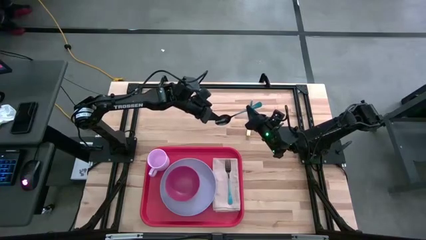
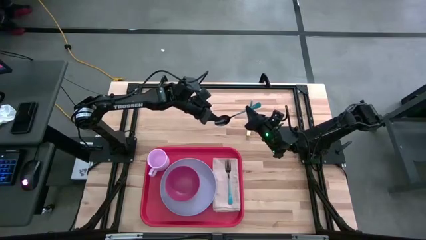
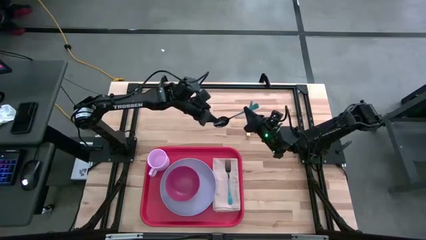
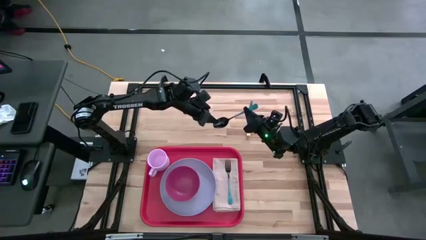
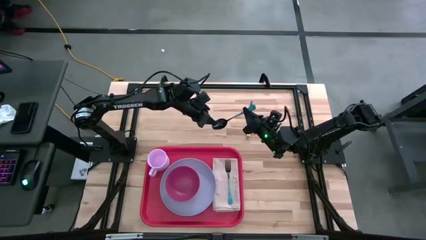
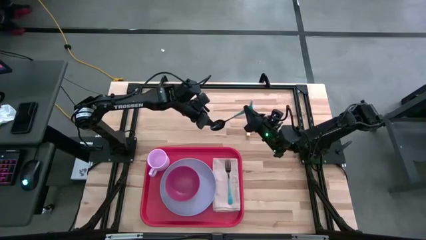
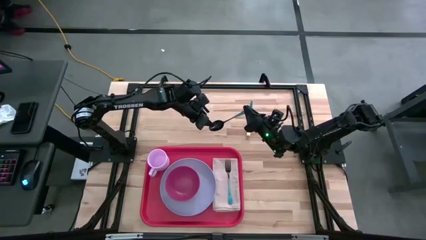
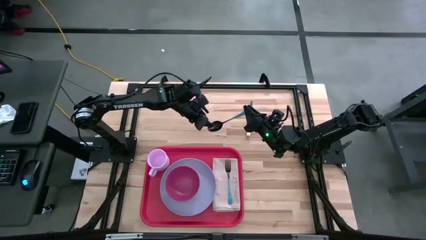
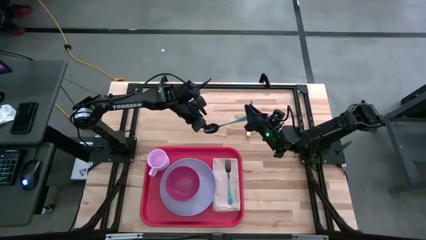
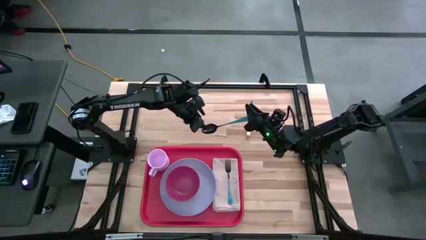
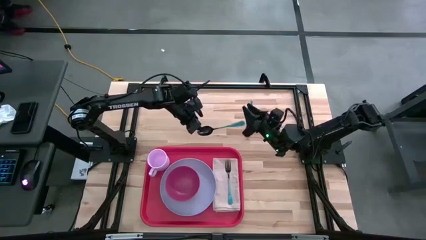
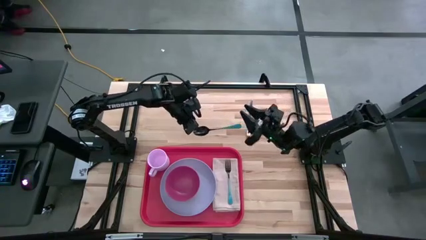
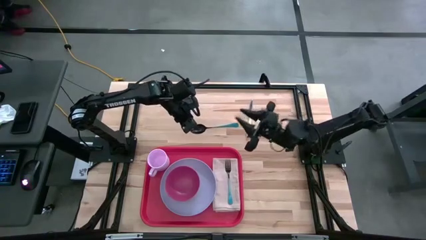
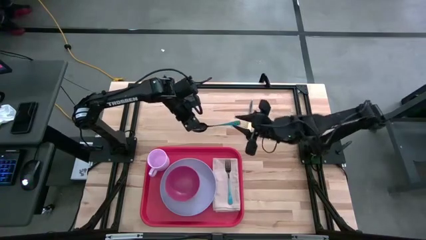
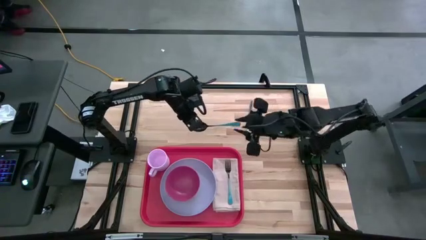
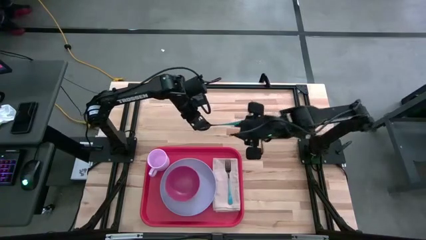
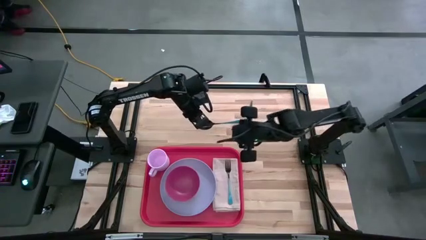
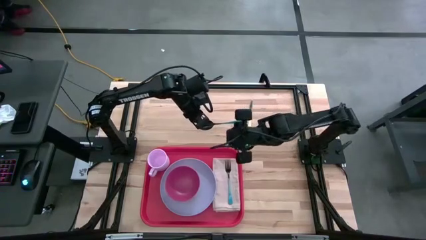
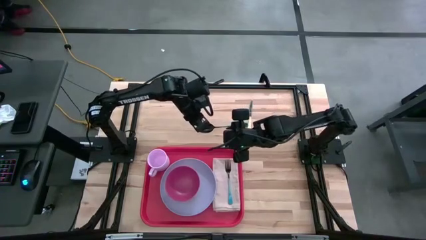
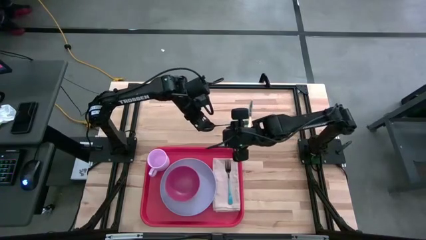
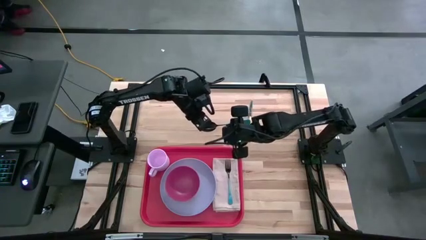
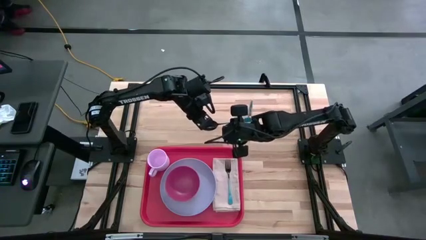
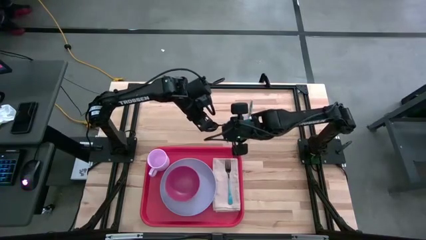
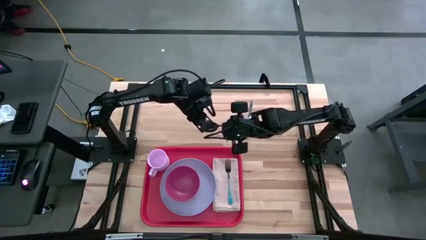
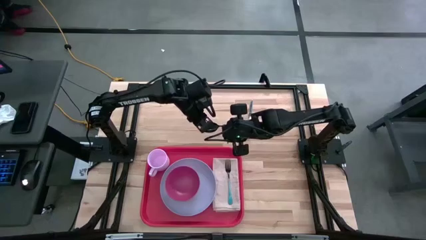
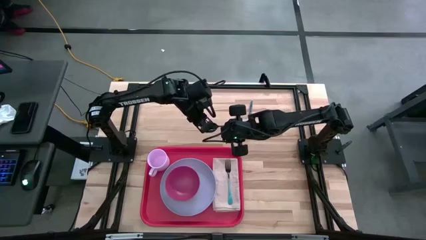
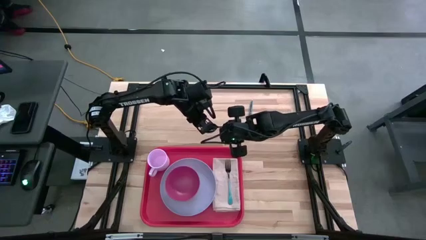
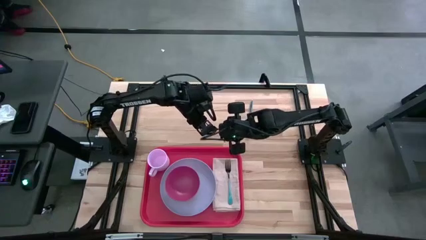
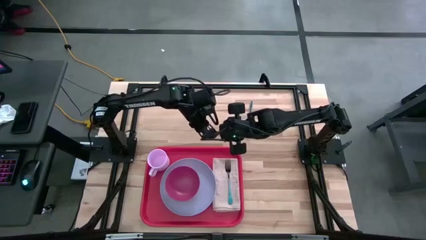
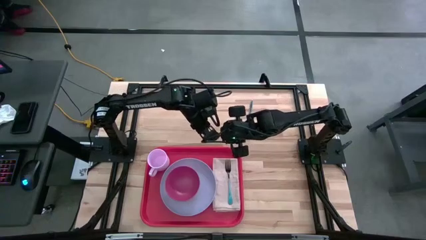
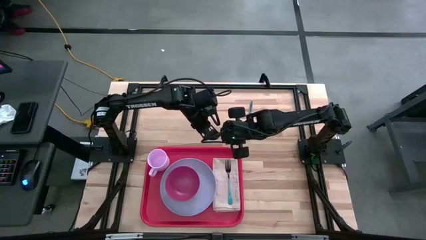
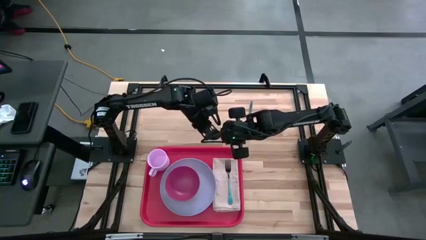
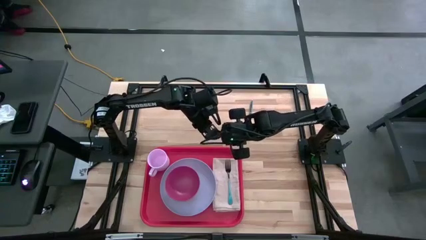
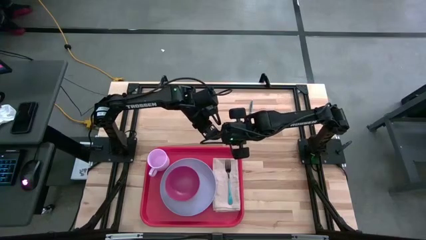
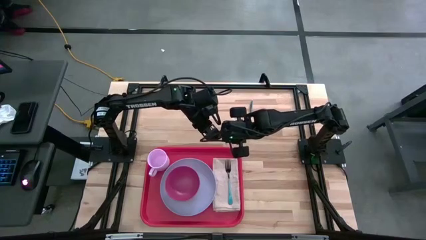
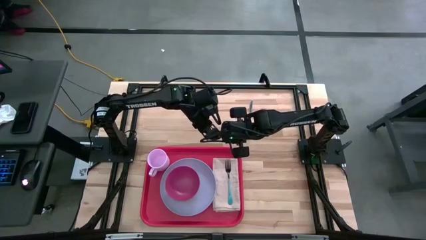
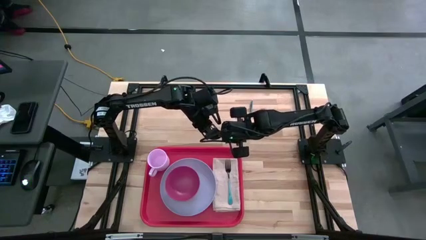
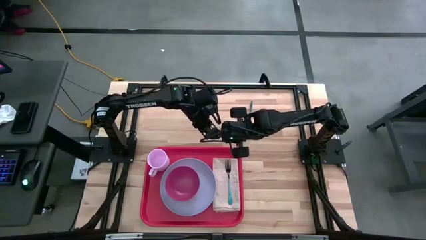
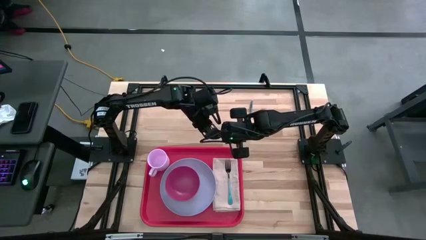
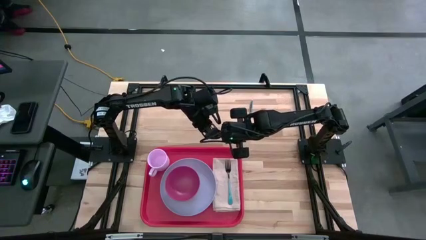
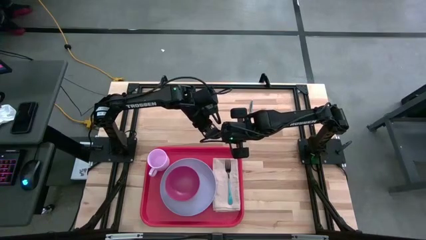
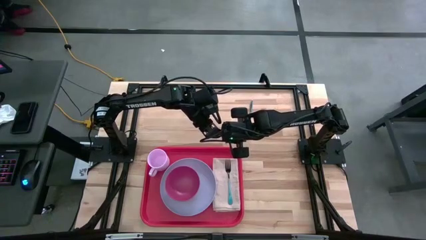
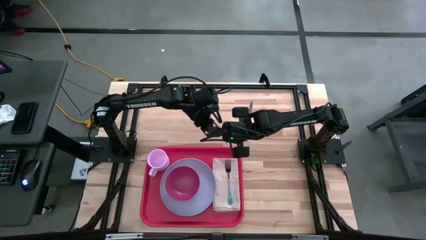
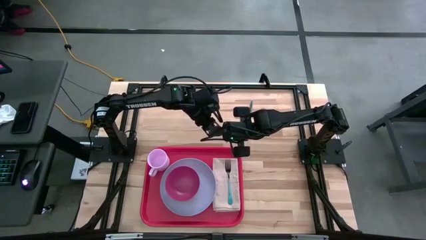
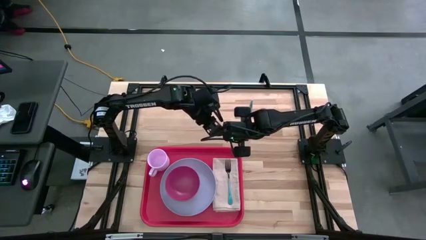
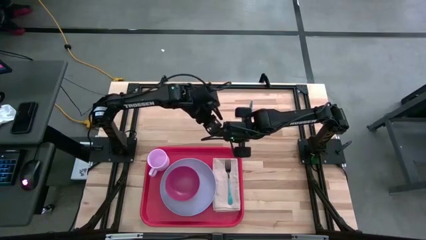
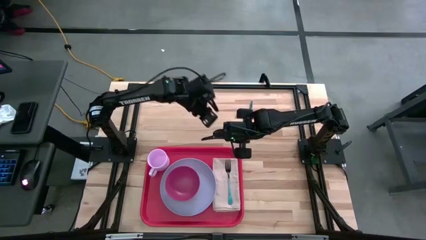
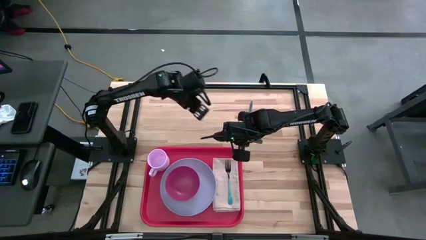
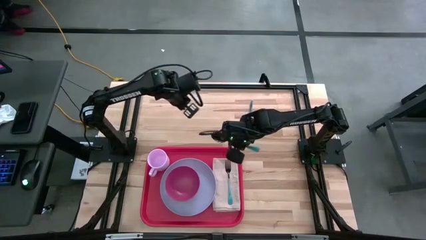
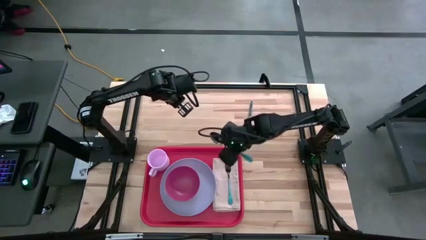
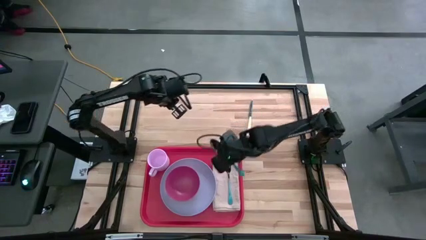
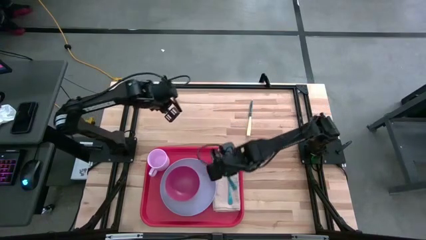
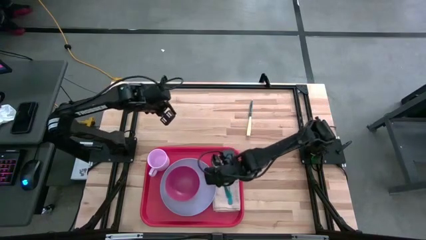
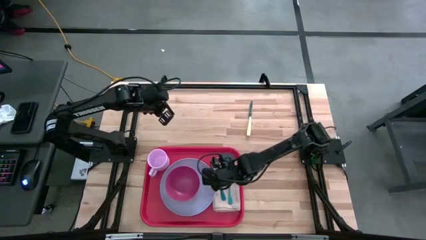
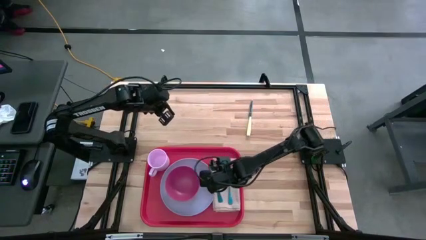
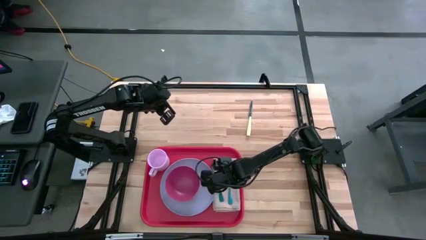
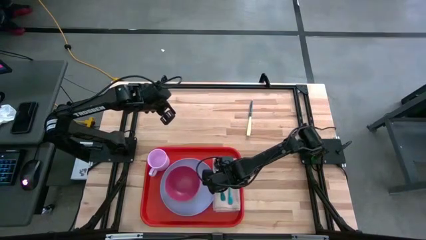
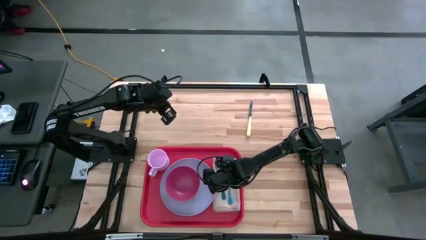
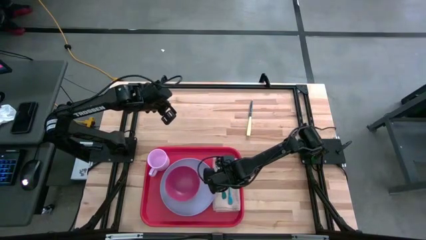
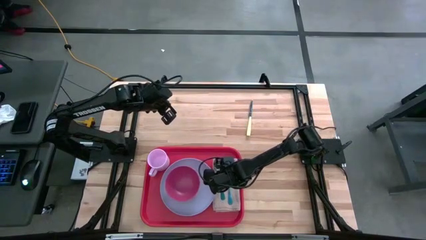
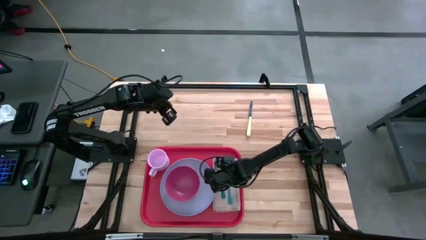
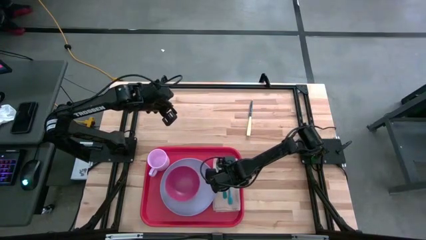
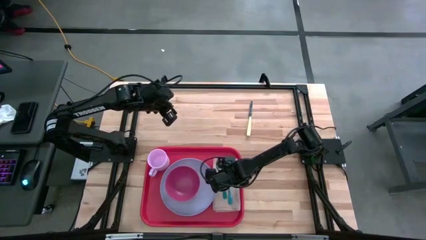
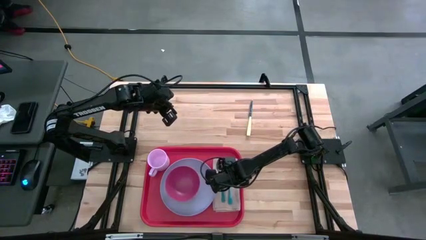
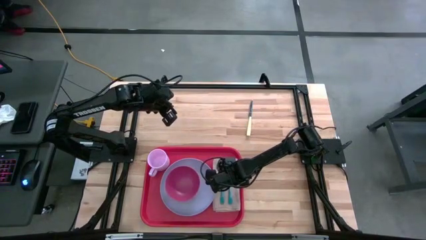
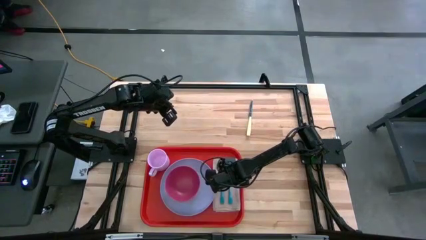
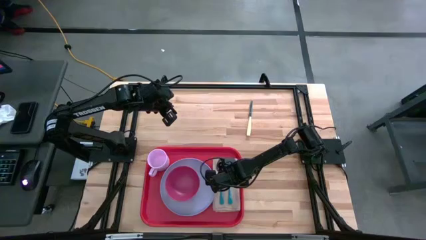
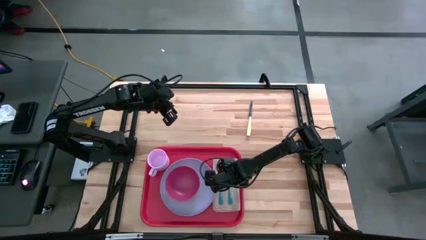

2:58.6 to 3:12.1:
Task: Set up tray
Put the blue spoon beside the blue plate on the peach napkin
